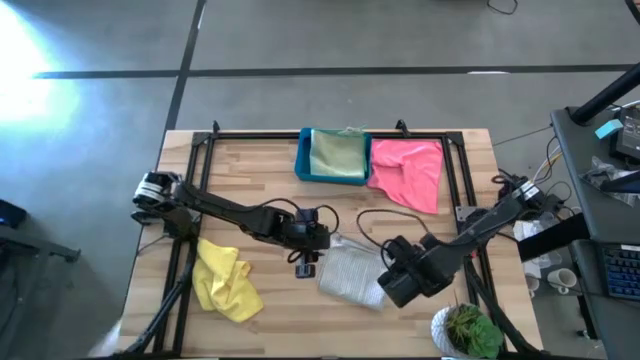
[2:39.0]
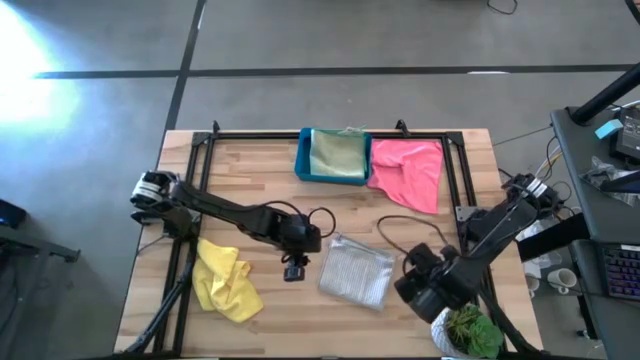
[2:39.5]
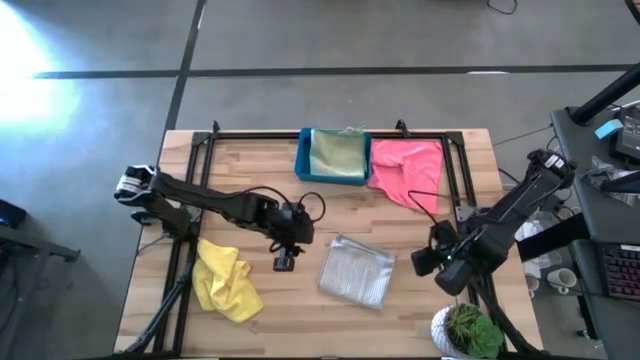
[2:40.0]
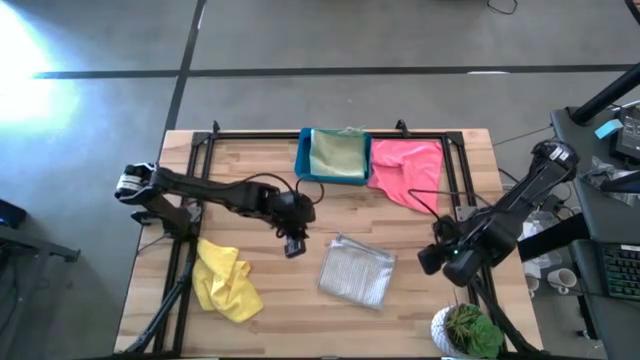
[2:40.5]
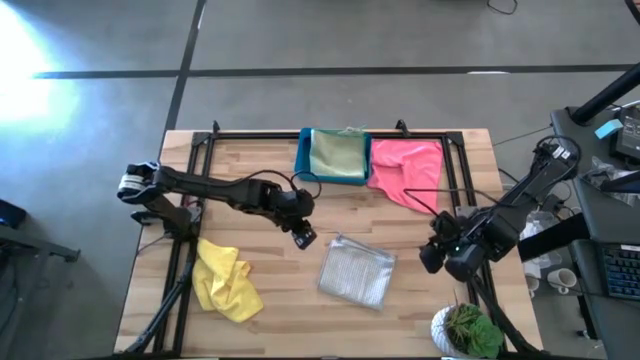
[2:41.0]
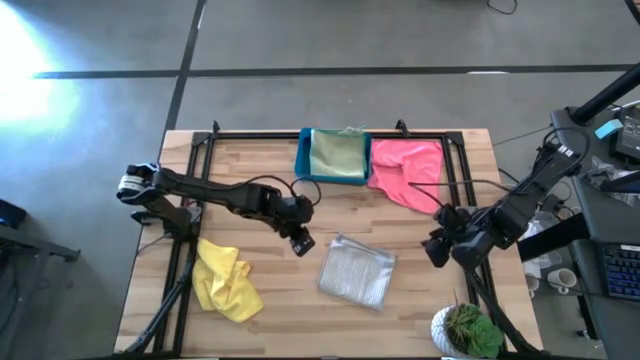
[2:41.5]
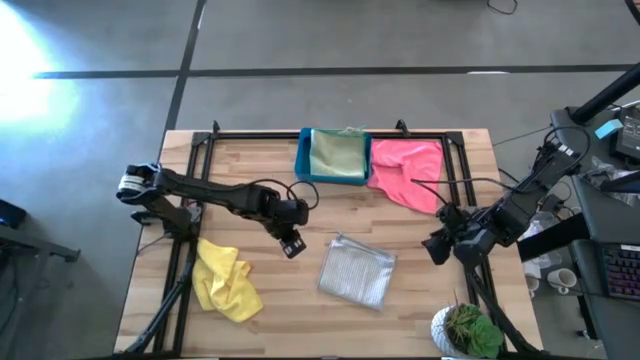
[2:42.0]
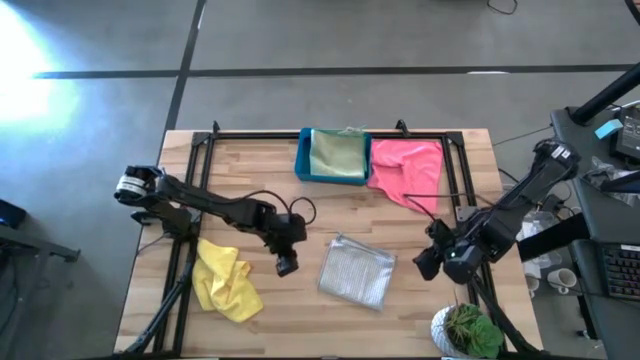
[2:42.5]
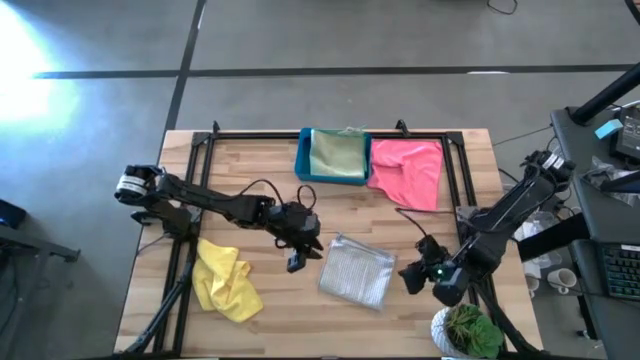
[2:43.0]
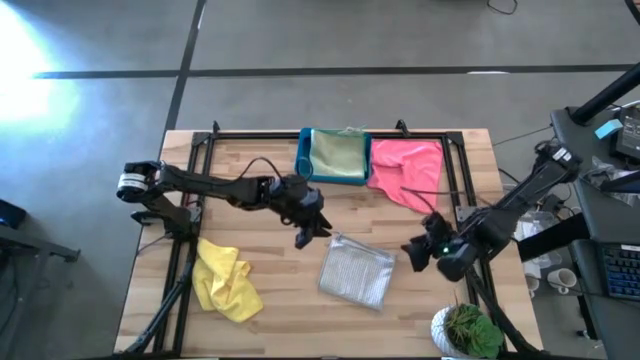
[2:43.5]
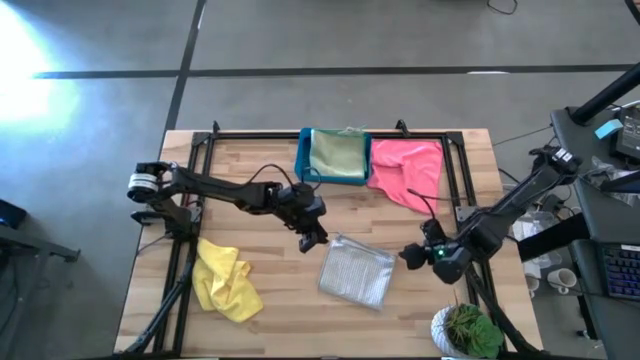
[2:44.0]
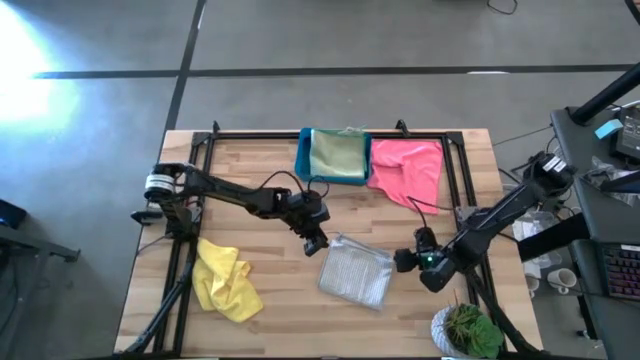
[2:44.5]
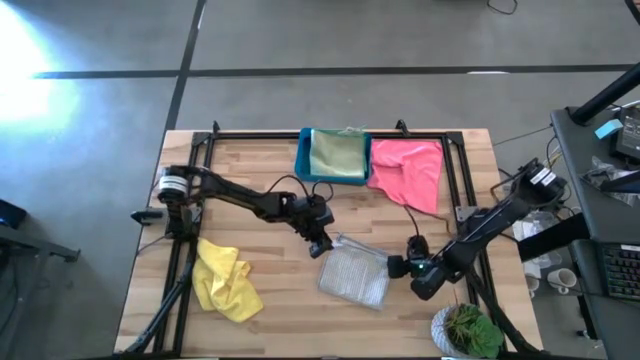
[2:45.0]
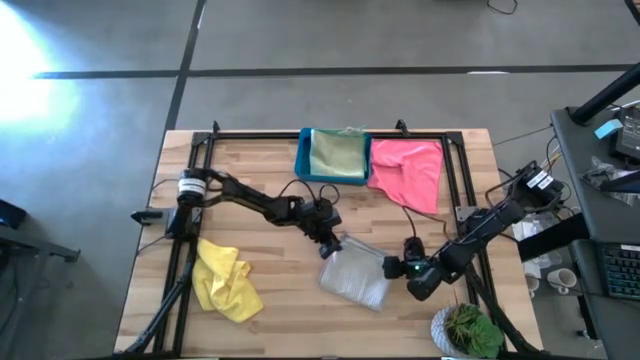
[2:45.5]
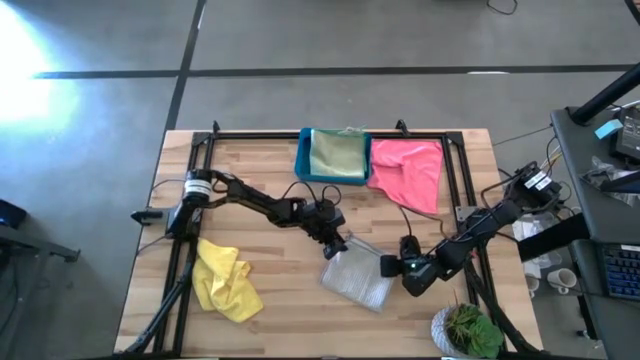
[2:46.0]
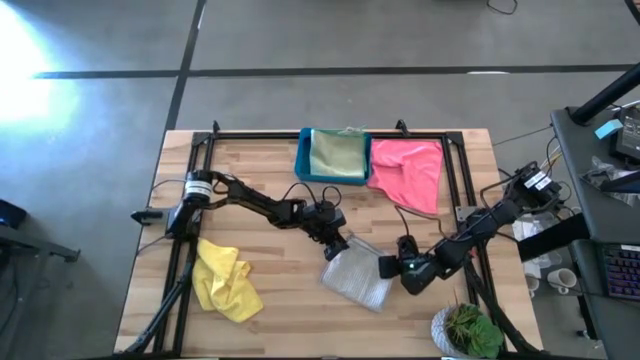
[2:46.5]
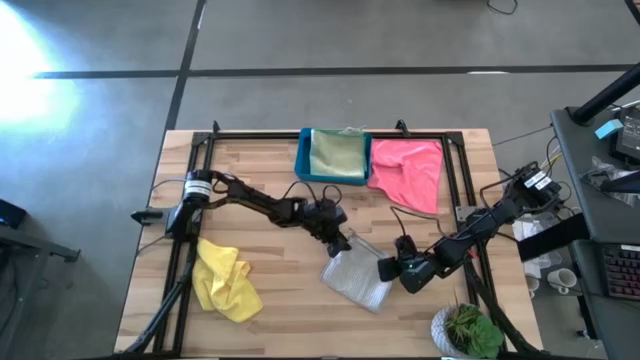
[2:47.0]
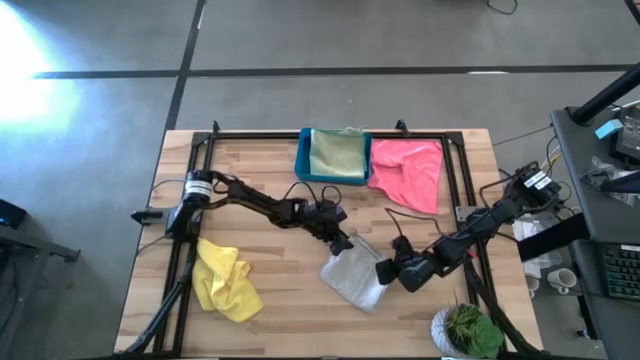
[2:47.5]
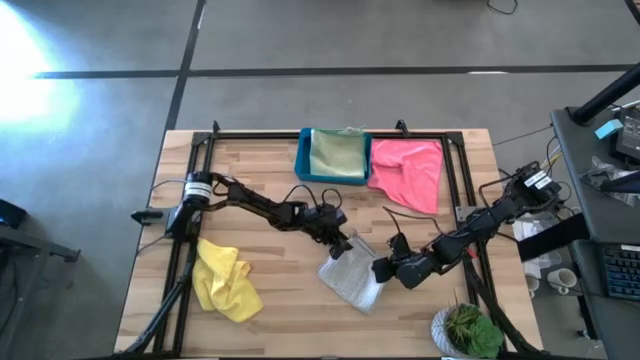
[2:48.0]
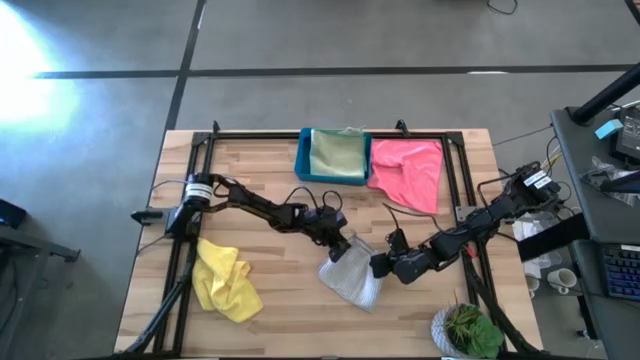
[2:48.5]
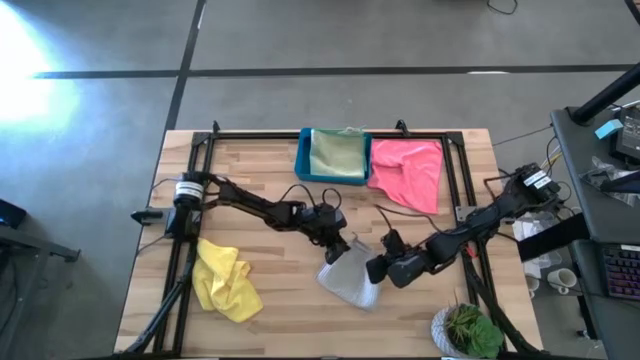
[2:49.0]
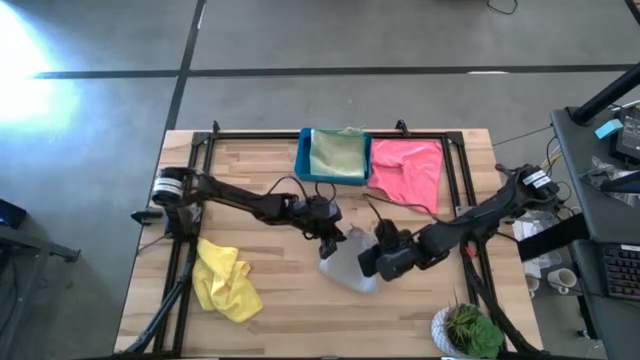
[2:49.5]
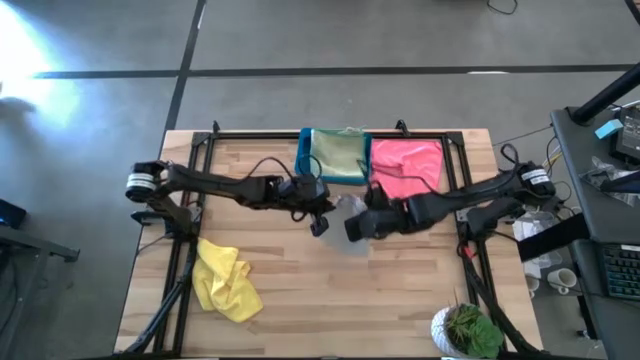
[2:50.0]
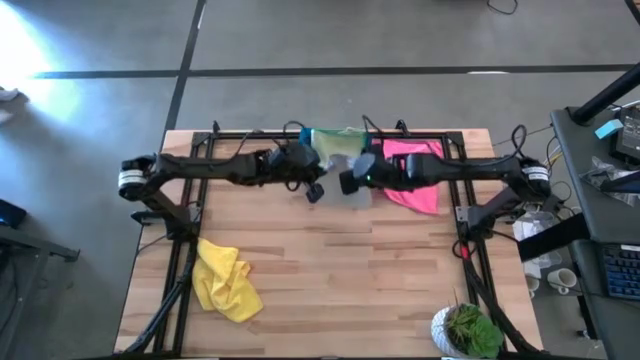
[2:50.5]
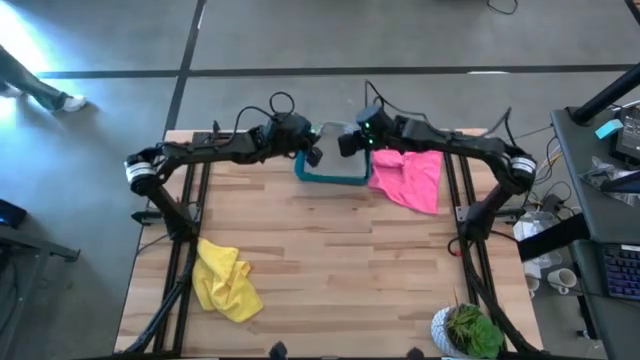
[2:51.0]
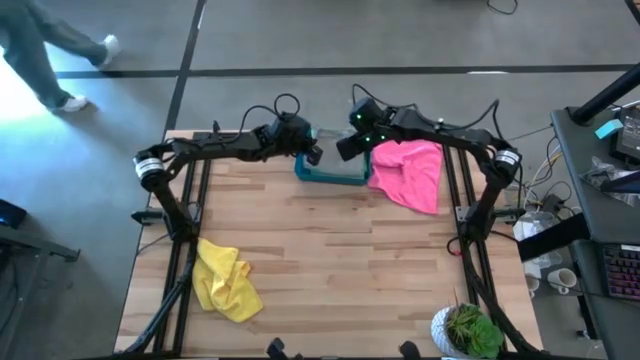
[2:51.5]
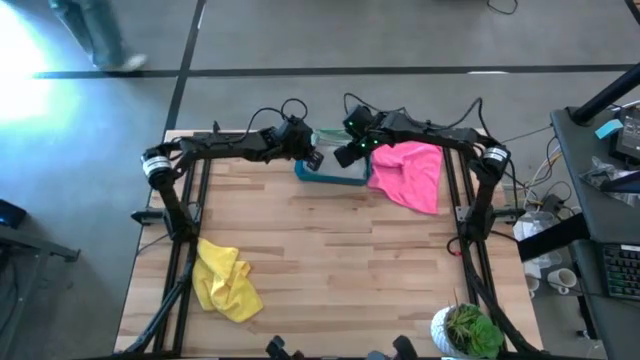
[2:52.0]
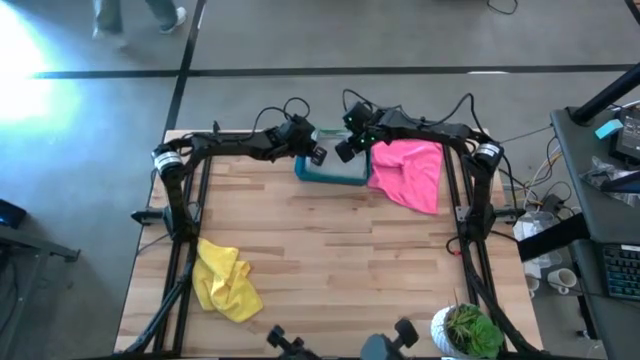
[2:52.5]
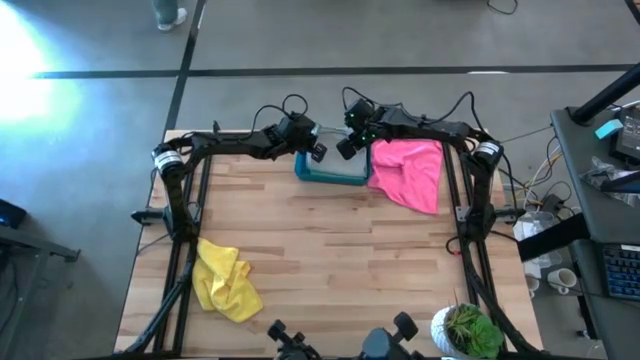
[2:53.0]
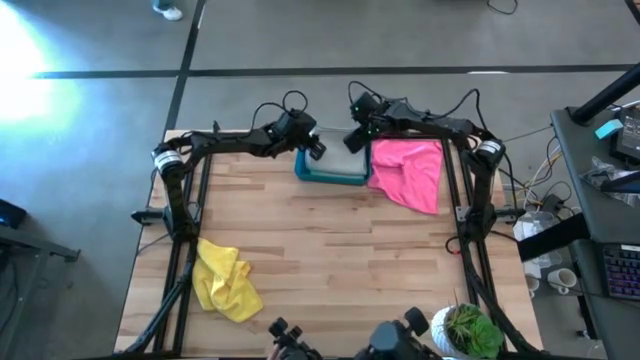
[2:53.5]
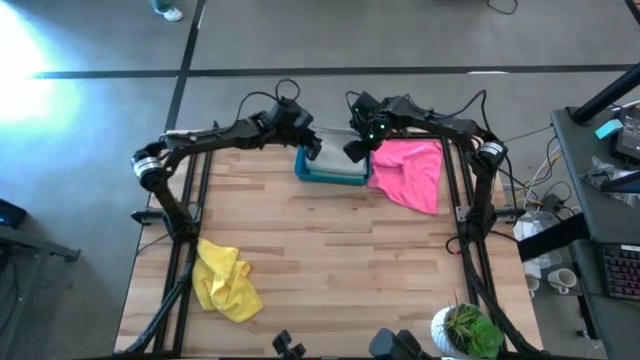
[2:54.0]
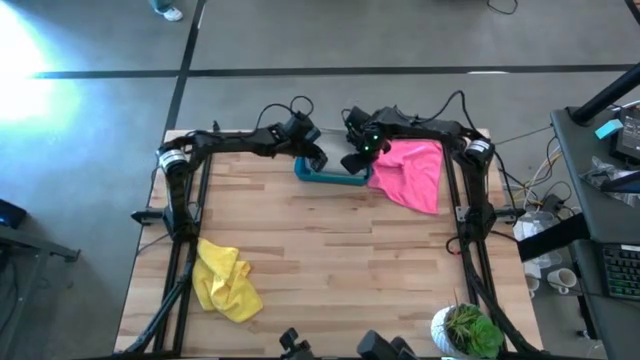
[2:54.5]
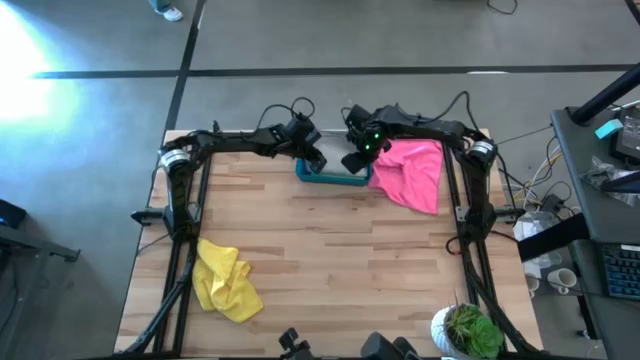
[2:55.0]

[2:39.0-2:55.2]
Task: Fold microfiber towels
Put the gray microfiber cloth into the blue bin

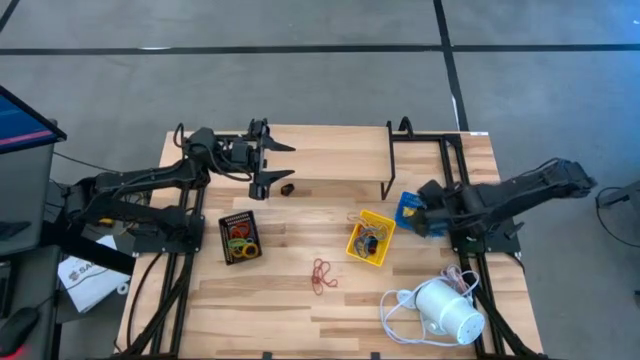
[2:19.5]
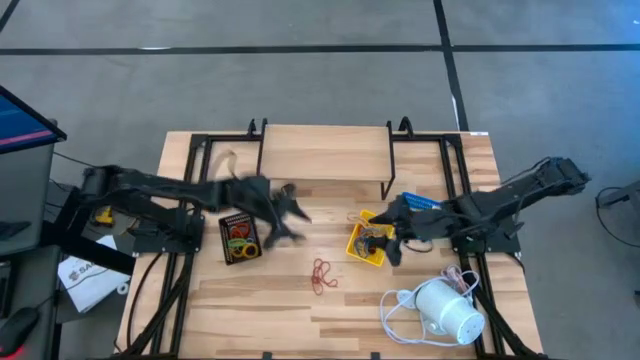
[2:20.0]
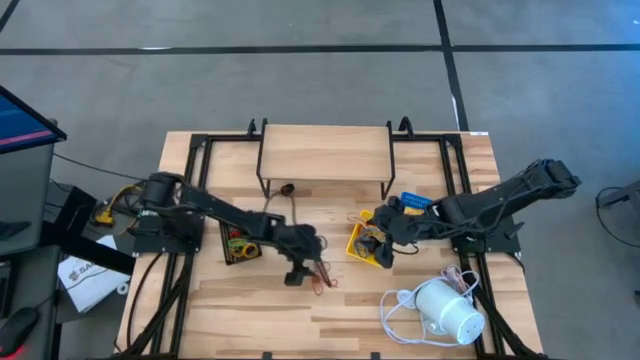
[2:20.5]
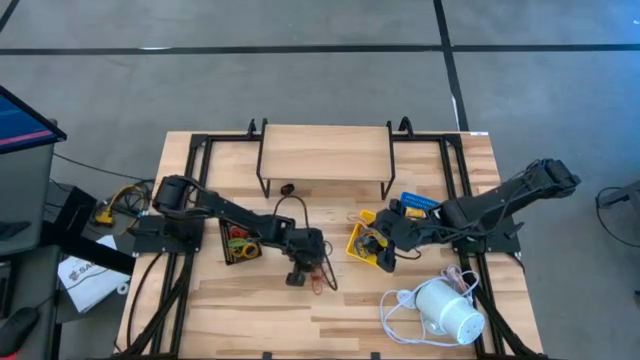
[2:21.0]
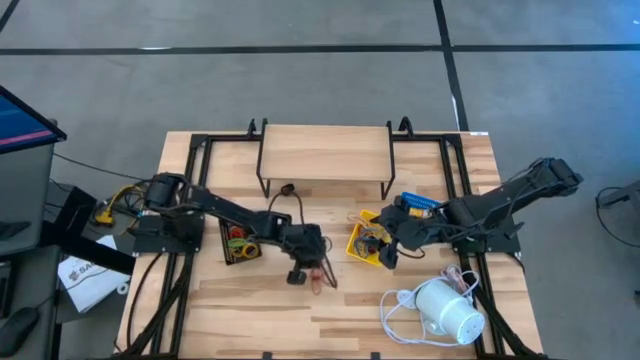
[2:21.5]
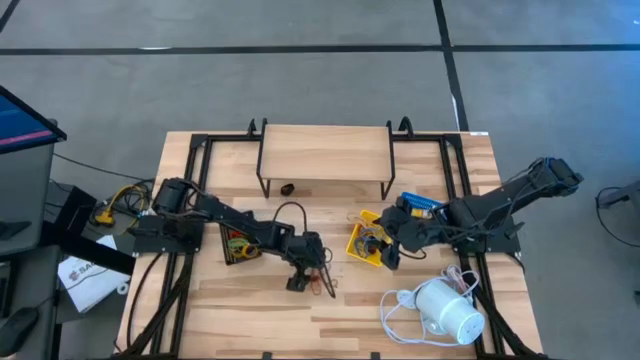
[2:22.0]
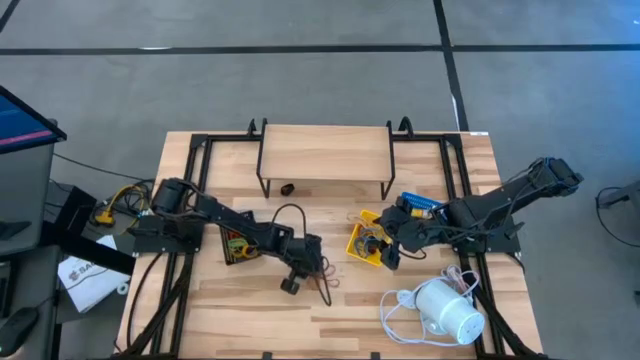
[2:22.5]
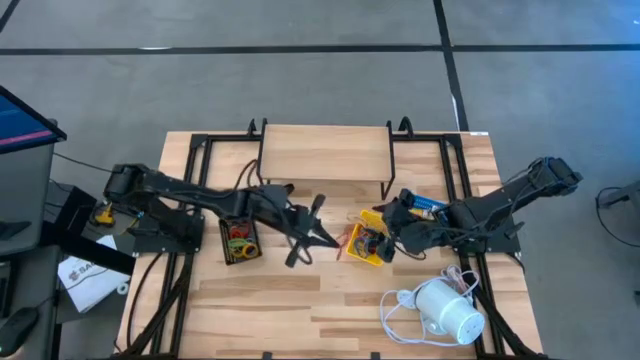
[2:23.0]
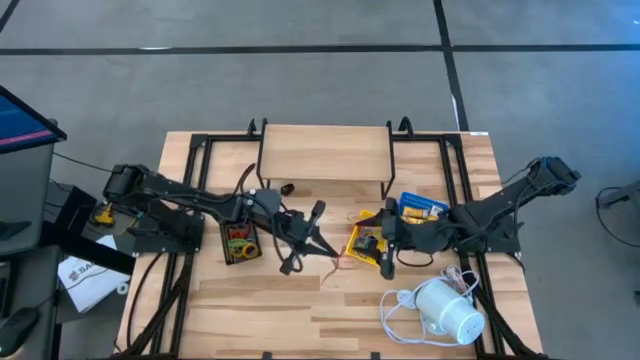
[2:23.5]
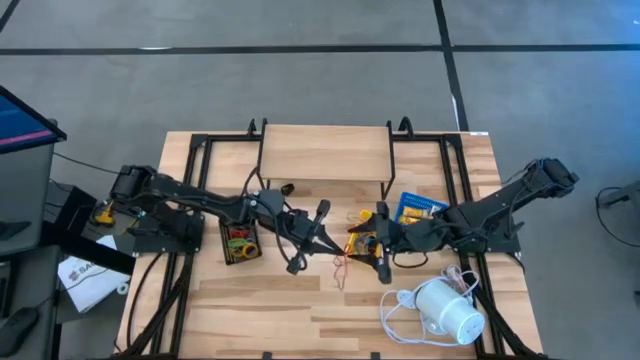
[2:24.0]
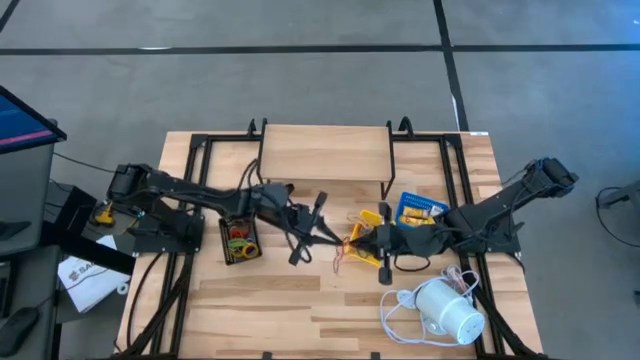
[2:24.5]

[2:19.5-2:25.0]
Task: Pick & Place Office Desk Supplies
Put the red rubber band into the yellow bin
